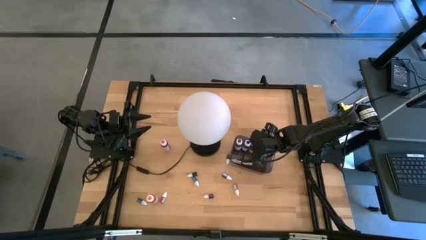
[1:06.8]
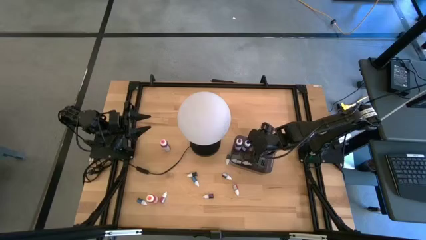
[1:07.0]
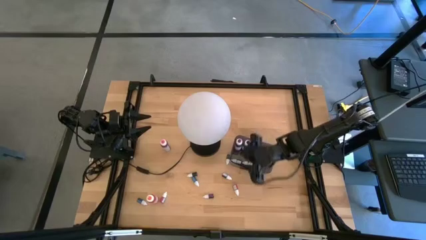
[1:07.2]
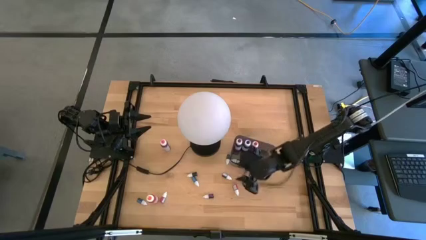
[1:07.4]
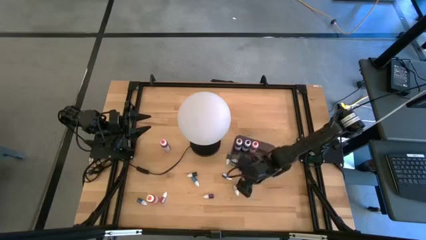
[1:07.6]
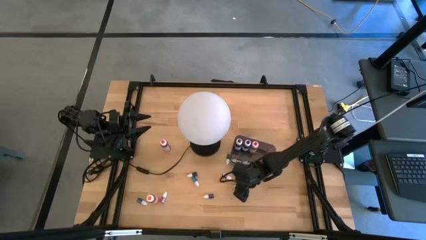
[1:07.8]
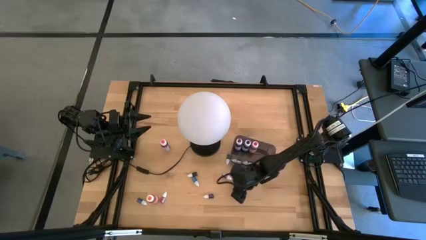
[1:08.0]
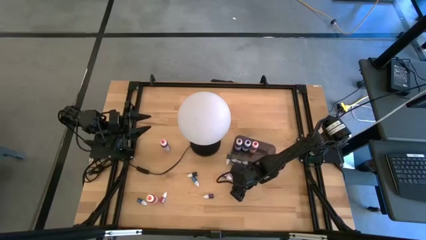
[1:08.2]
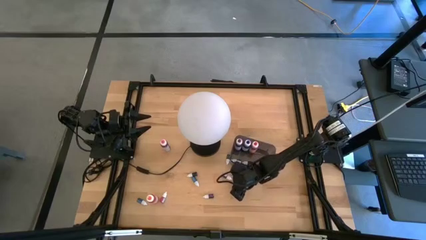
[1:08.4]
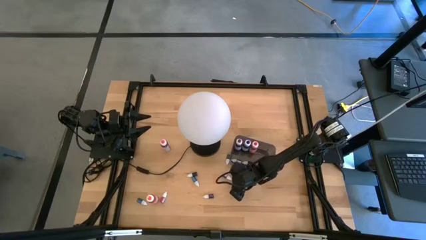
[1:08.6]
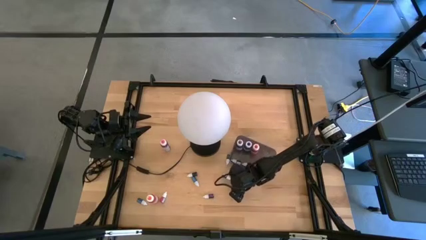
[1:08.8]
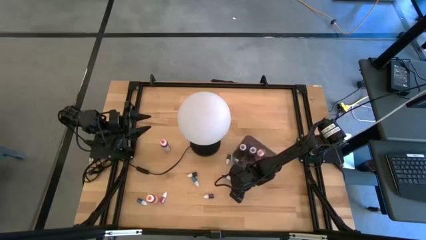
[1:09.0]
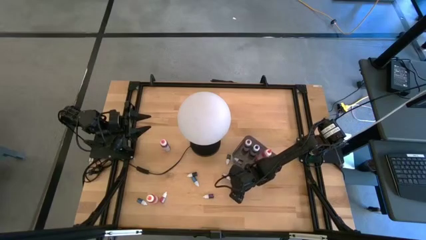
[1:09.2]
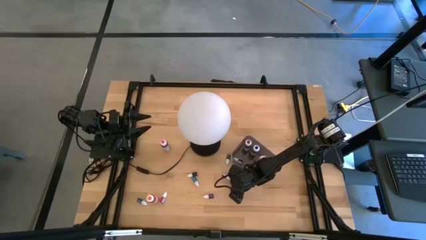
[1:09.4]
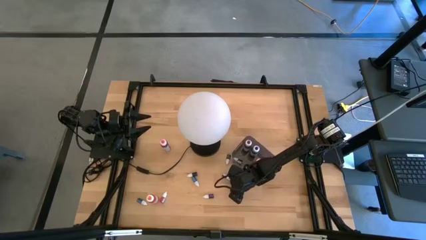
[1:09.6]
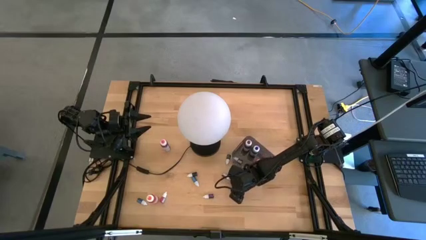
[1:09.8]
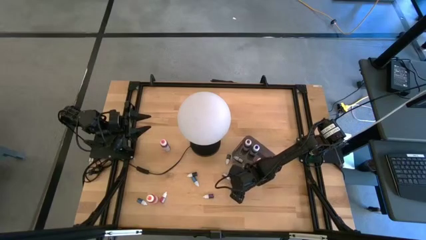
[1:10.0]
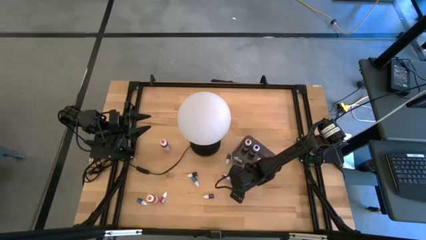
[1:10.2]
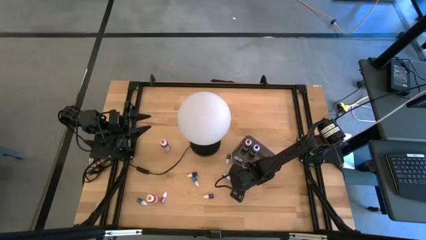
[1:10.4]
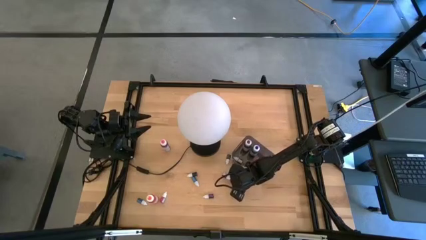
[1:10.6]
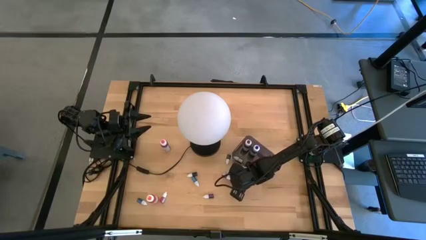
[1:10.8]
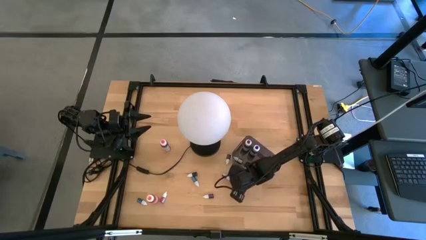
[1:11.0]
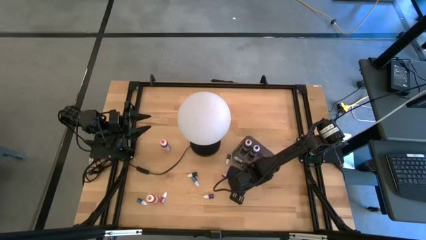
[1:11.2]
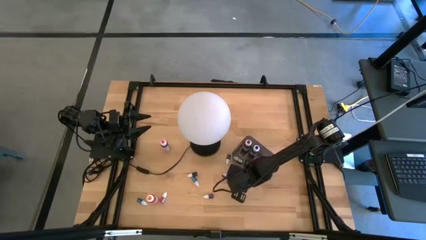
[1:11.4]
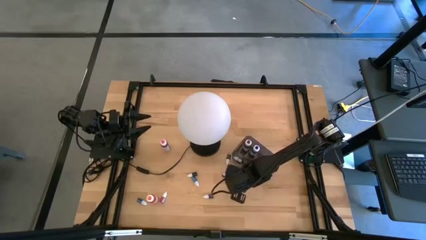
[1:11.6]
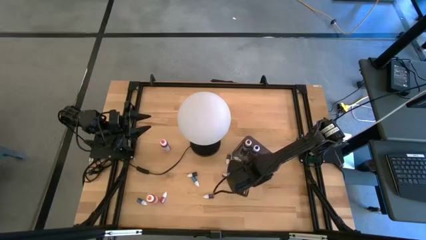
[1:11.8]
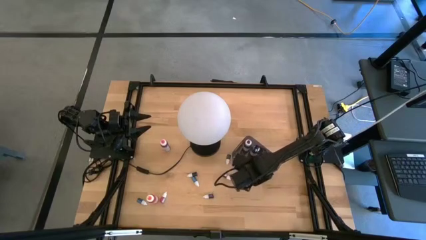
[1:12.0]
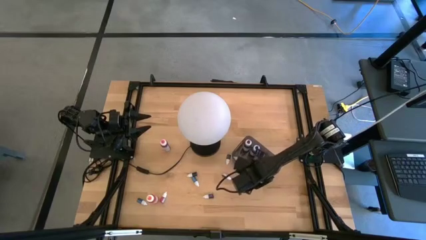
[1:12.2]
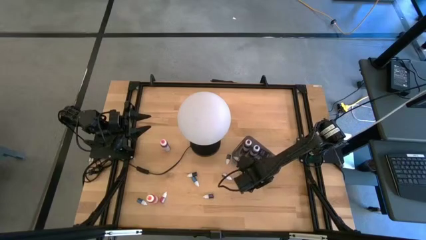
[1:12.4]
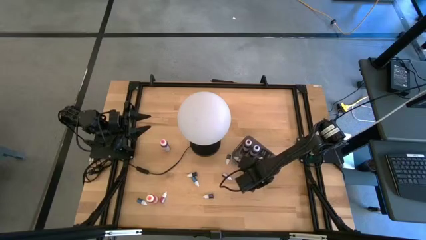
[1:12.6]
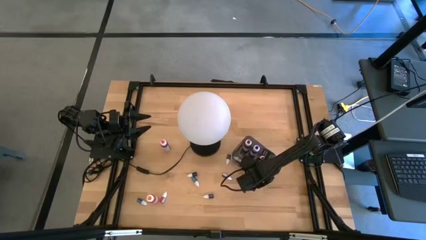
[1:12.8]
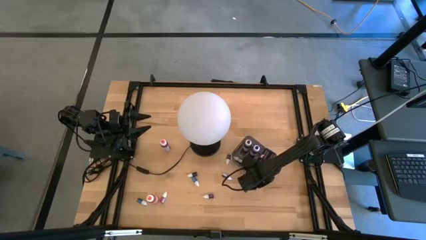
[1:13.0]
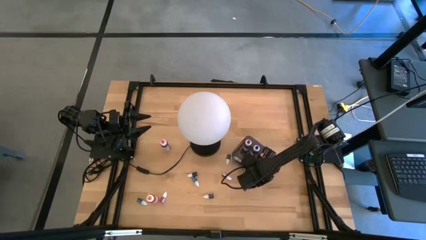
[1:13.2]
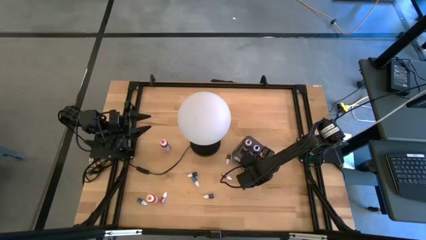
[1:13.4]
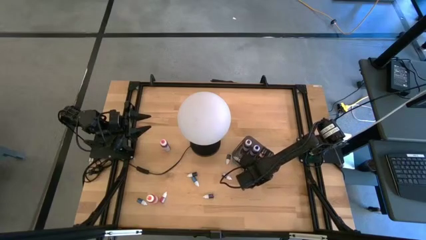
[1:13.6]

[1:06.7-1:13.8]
Task: Pick & Place food coloring
Put the small red food coloring bottle into the black container

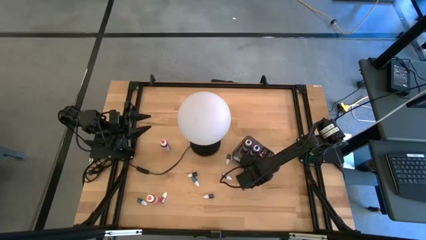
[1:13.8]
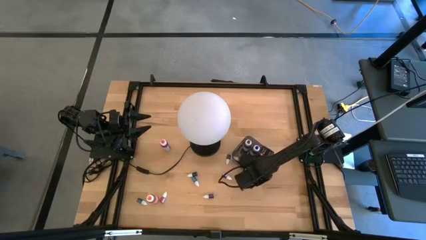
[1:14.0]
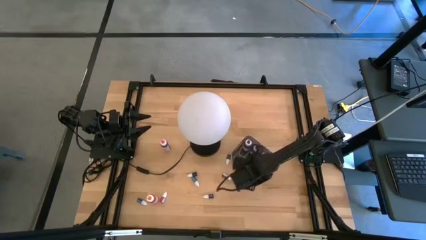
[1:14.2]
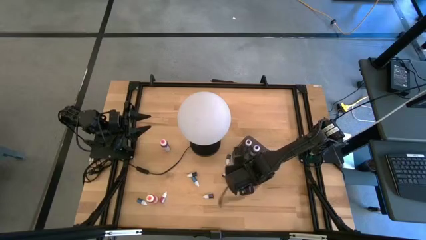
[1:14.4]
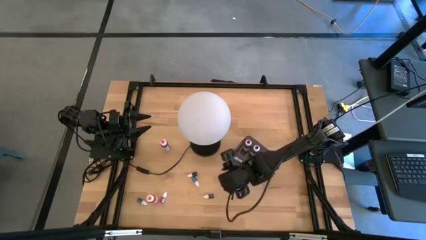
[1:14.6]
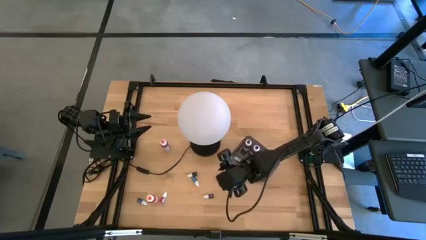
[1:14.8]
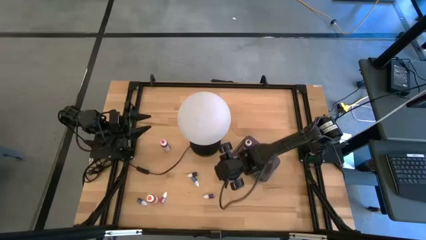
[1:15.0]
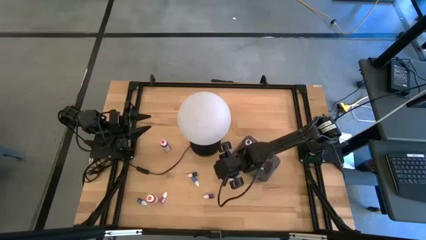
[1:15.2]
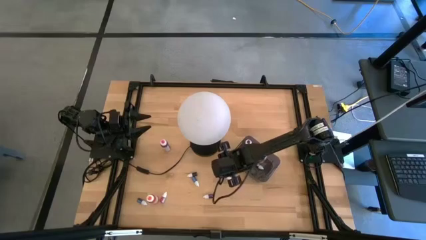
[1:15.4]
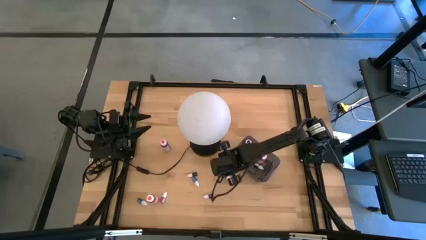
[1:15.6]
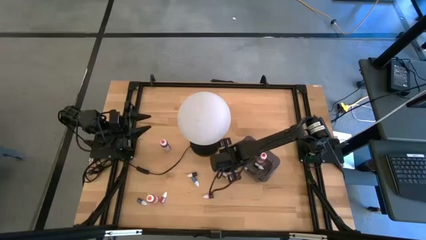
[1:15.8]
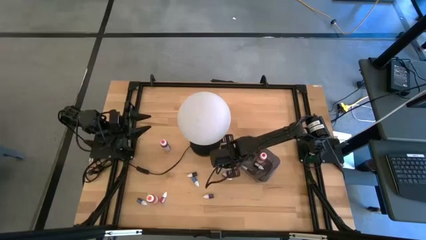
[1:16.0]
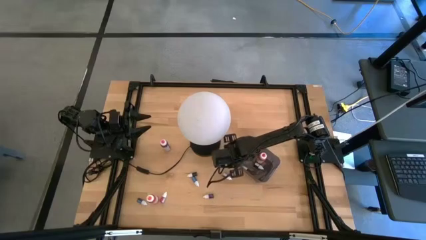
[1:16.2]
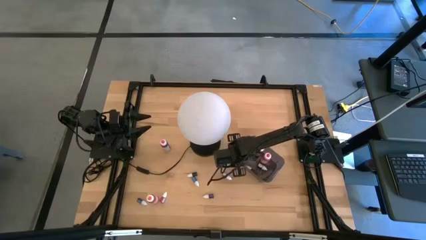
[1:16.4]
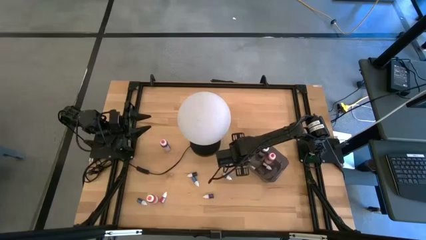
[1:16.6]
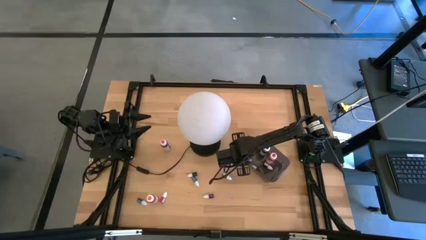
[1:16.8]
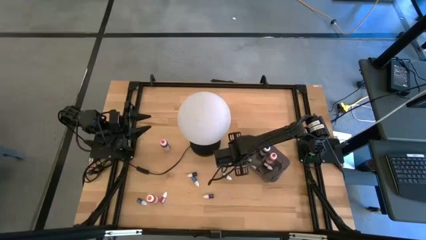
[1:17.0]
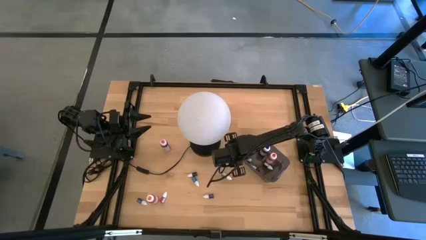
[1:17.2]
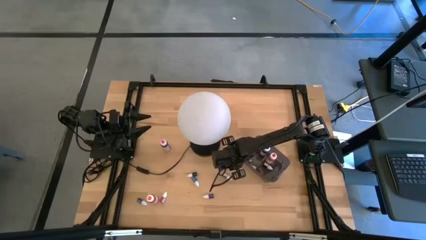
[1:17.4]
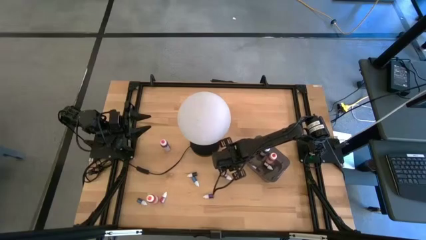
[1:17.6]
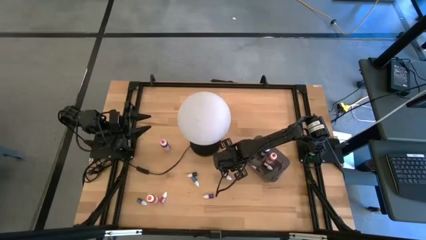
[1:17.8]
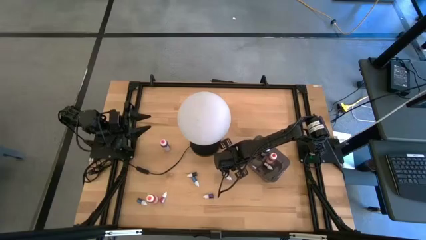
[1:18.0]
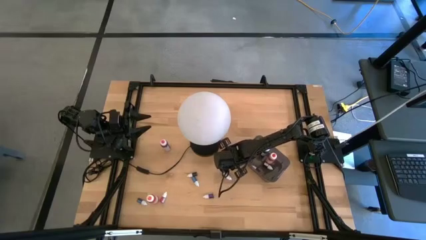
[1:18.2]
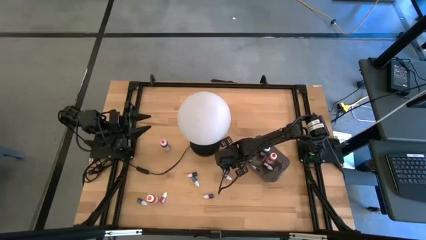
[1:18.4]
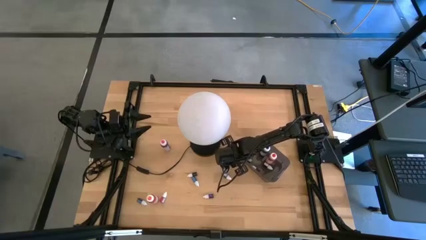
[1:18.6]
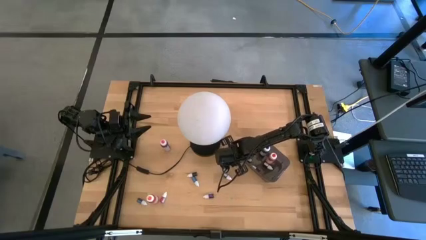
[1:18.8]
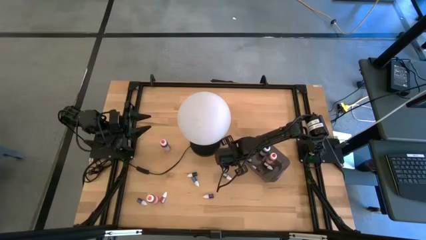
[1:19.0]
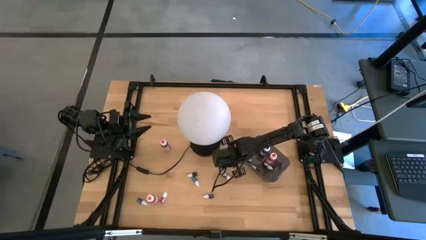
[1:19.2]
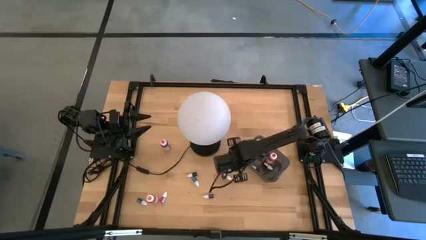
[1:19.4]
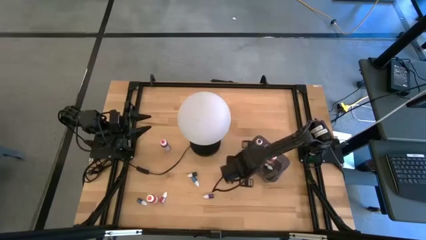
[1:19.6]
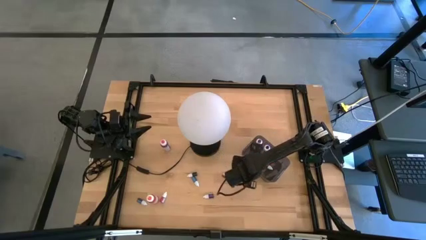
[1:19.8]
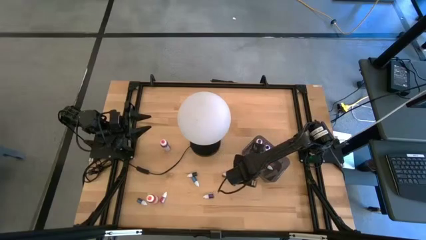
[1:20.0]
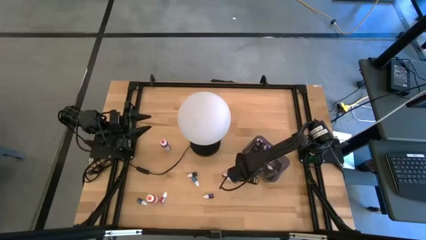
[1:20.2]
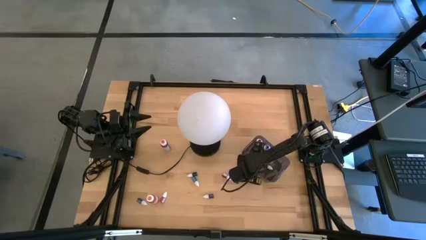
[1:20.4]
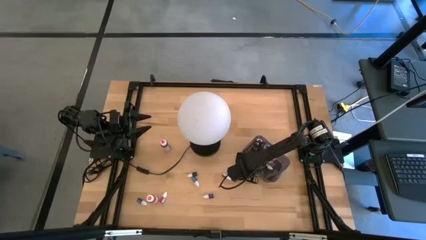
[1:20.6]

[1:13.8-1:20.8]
Put the right small green food coloring bottle into the black container
